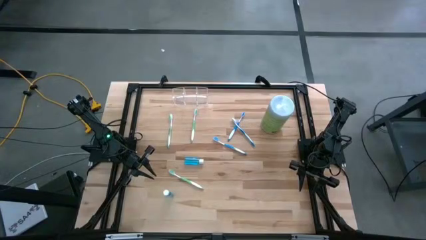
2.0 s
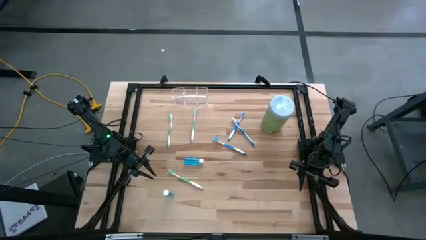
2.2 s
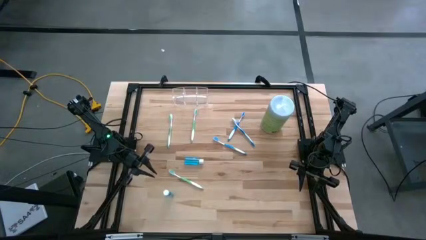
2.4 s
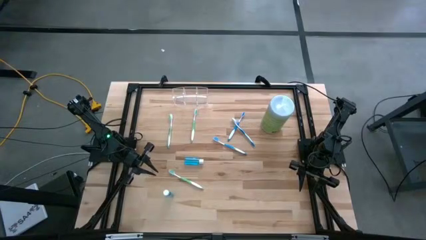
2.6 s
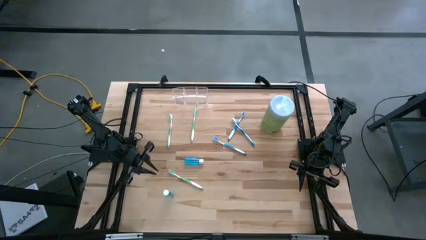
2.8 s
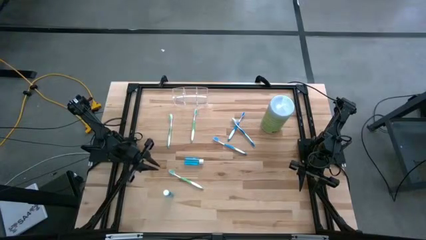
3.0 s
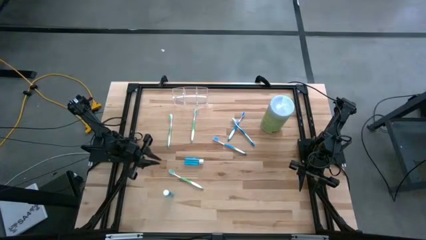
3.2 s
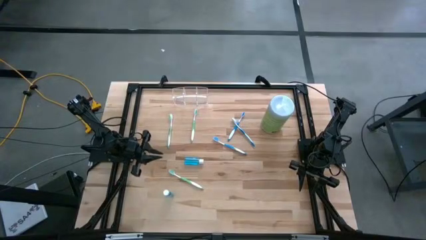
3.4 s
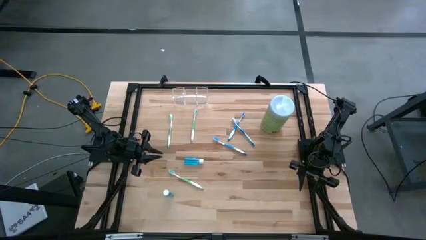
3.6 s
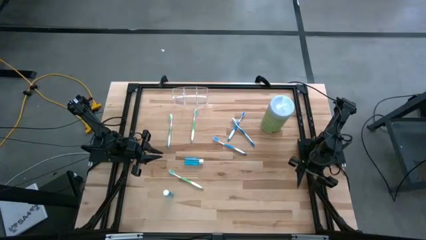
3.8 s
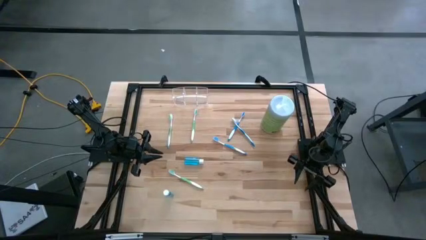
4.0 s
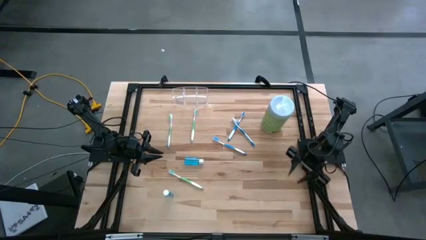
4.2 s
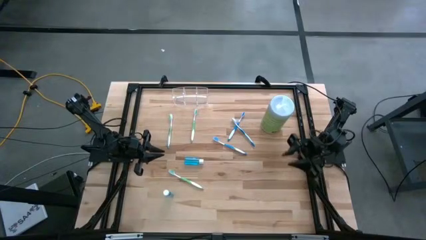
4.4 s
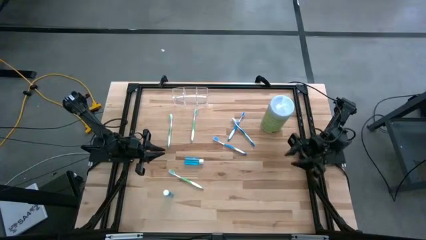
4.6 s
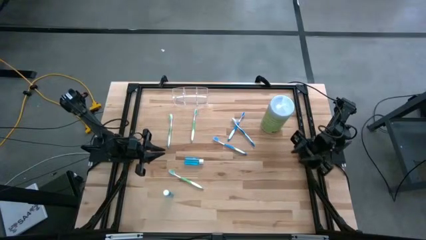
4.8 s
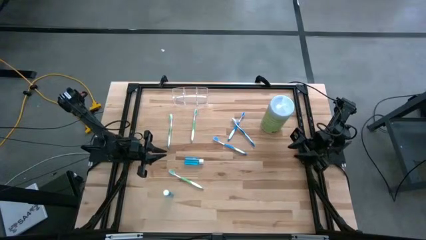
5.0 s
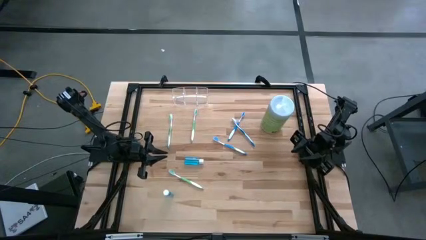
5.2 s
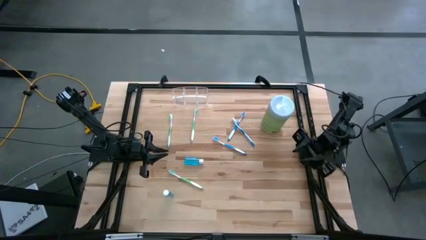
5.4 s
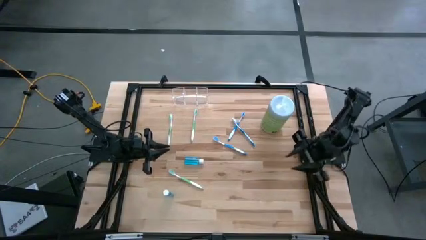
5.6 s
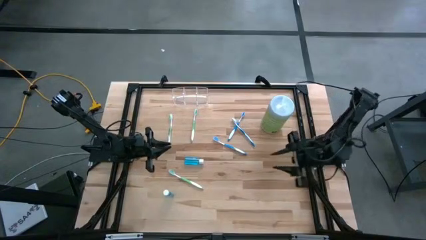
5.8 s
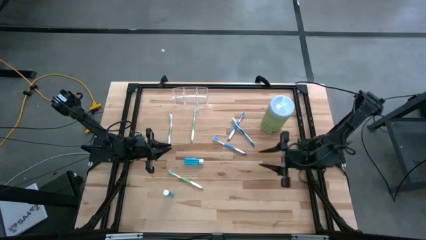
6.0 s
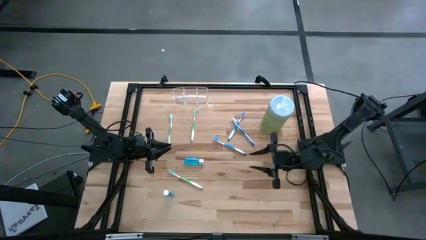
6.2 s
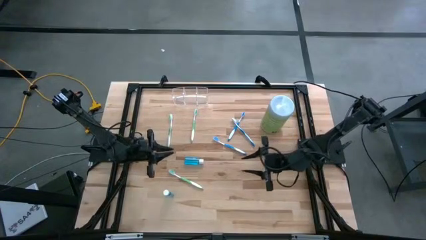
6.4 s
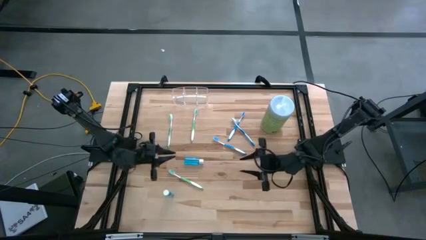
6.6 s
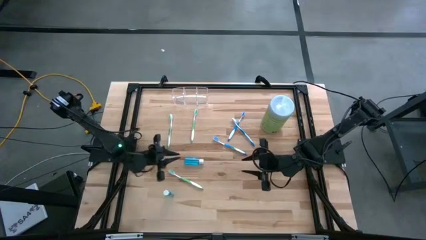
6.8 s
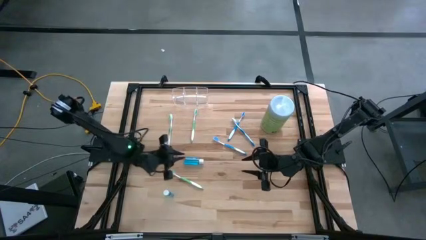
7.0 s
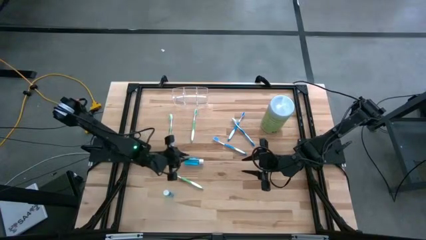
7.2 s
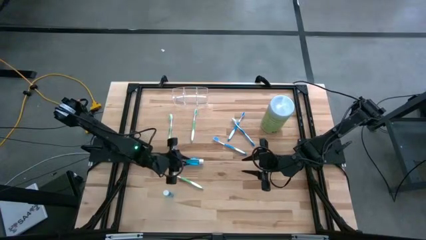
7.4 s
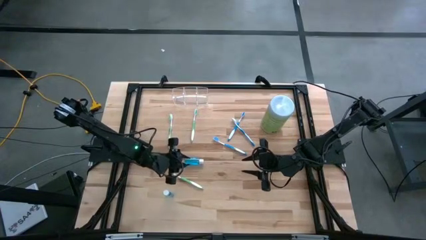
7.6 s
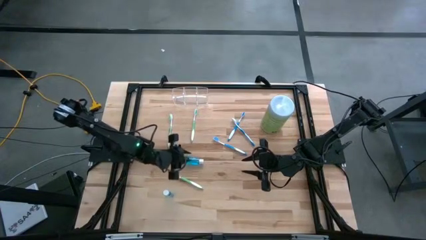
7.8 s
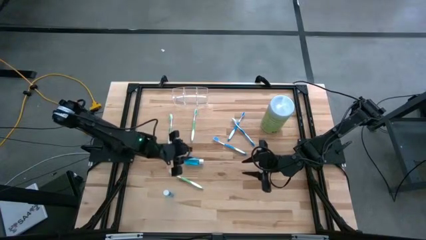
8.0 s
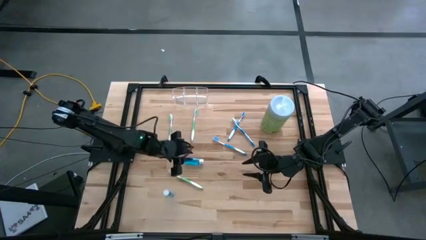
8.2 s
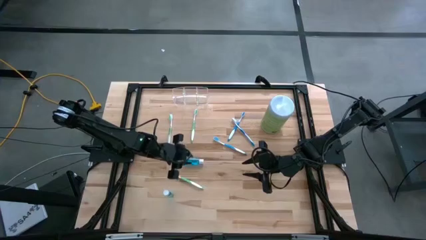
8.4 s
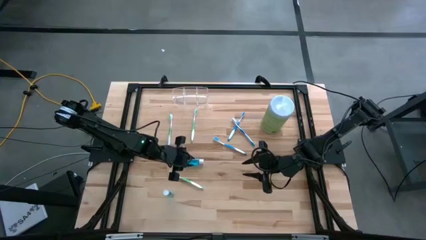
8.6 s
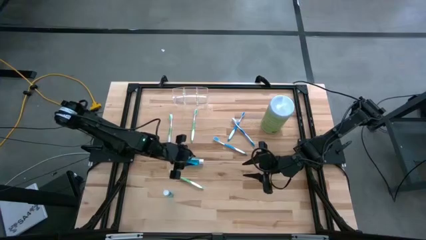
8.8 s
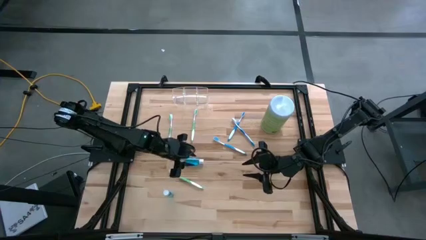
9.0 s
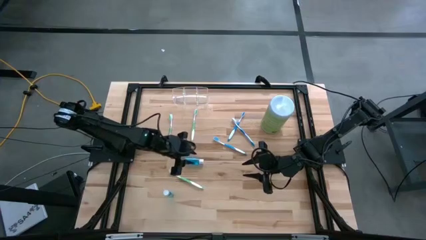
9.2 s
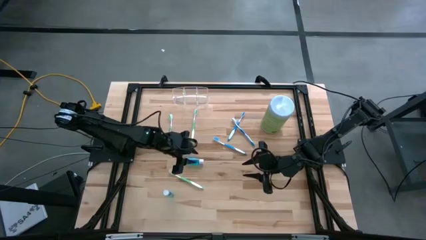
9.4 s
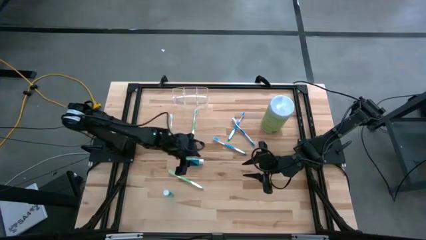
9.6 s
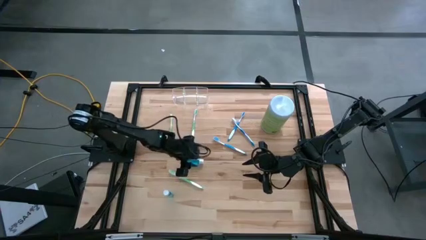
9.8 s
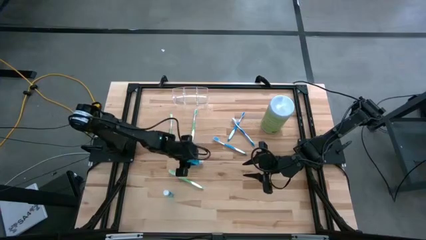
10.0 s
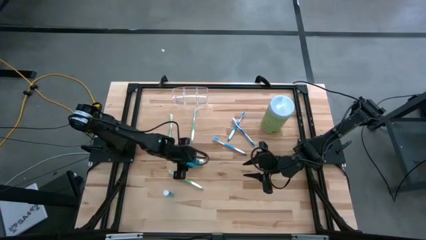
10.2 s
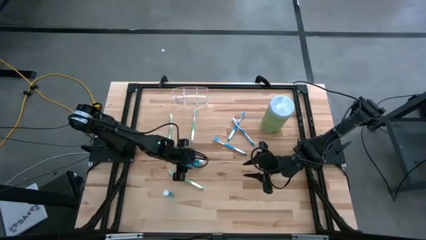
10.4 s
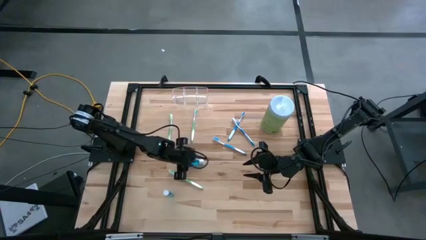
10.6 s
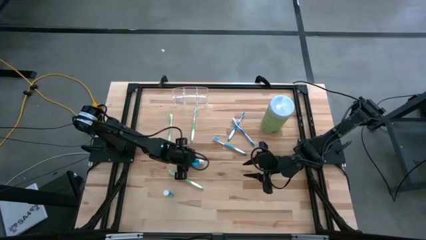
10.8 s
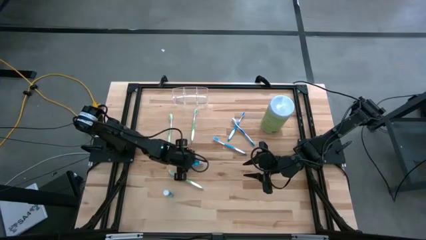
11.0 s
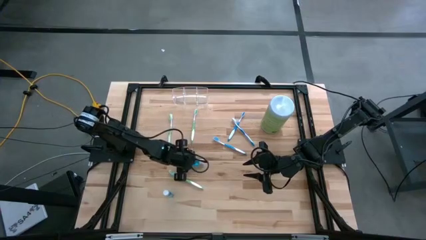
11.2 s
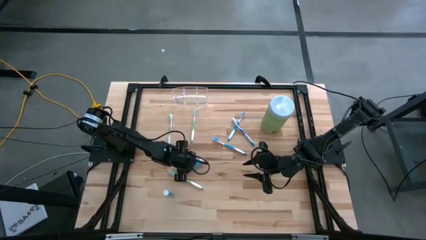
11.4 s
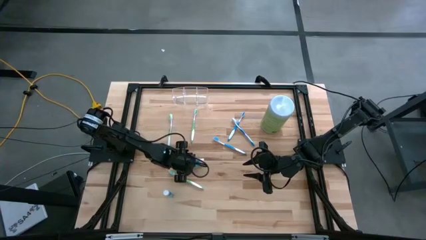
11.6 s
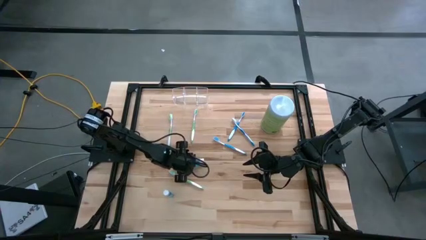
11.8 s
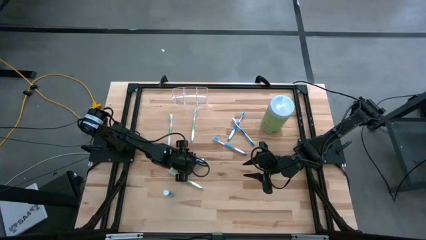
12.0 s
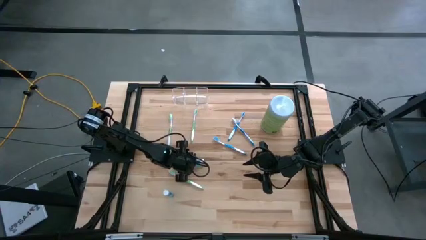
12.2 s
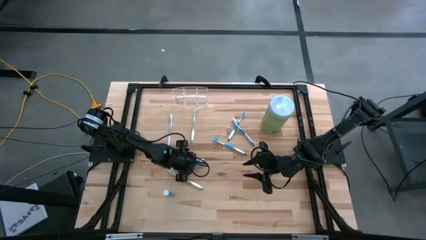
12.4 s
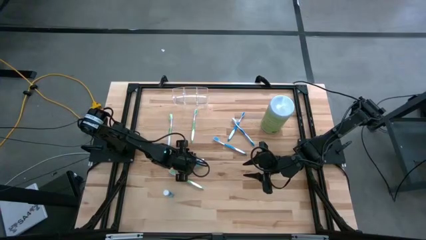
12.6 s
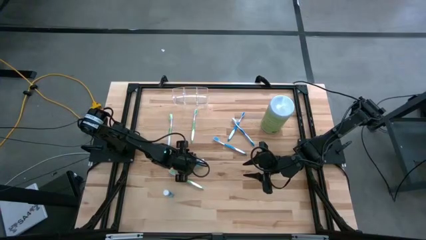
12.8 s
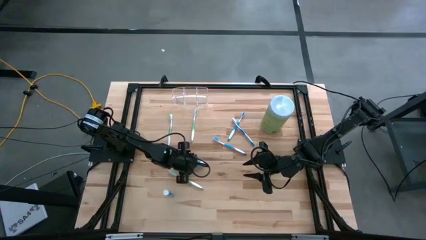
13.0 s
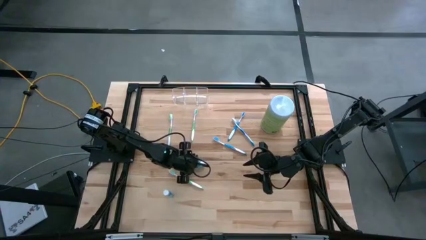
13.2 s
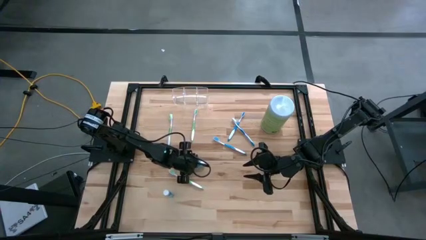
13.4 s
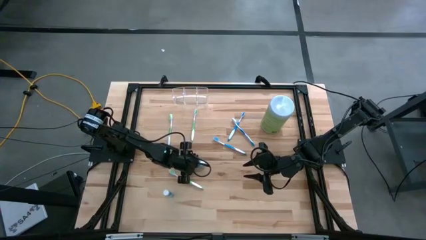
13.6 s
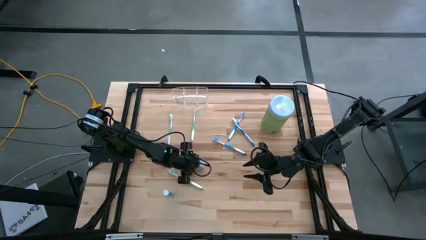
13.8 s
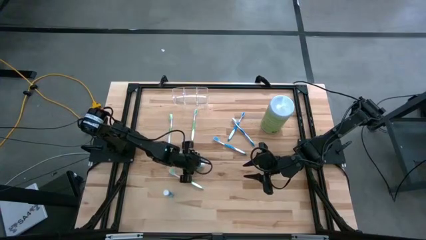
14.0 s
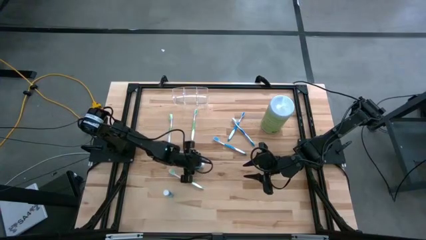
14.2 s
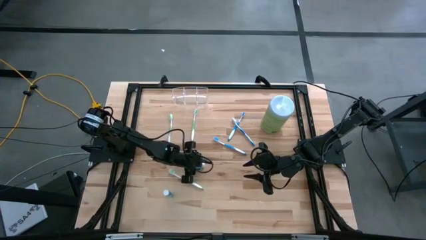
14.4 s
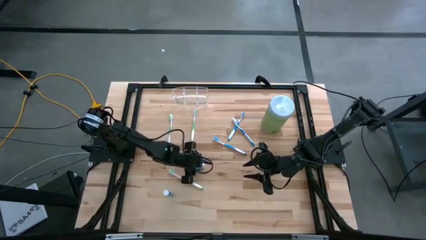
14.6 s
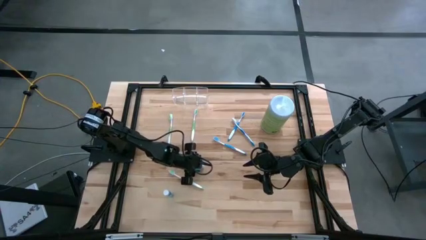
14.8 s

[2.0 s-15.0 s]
Task: Pick & Place toothbrushing station
Put the top blue mouthwash into the middle section of the transparent organizer
